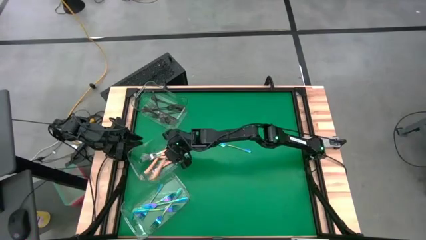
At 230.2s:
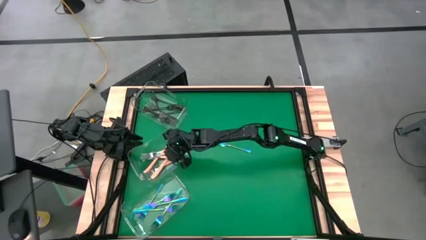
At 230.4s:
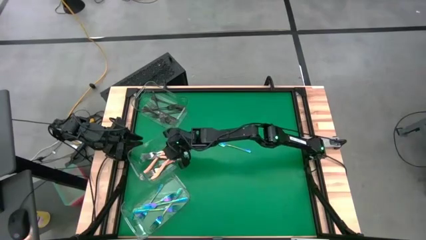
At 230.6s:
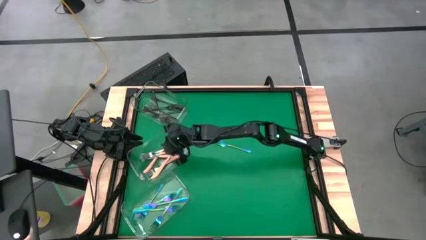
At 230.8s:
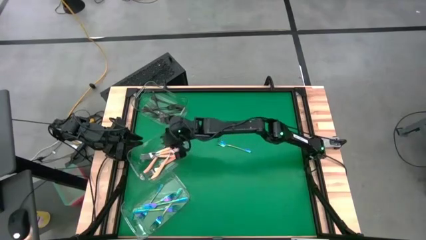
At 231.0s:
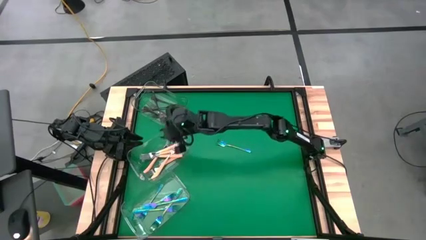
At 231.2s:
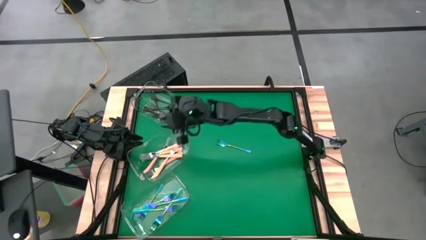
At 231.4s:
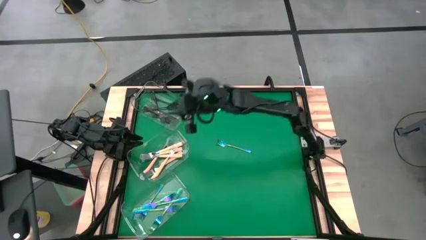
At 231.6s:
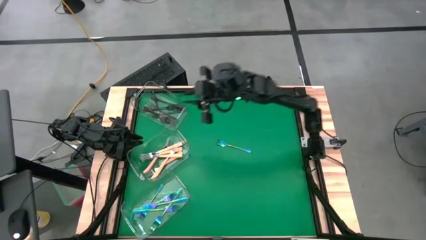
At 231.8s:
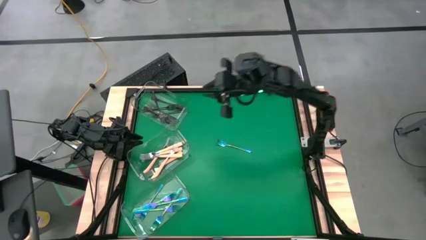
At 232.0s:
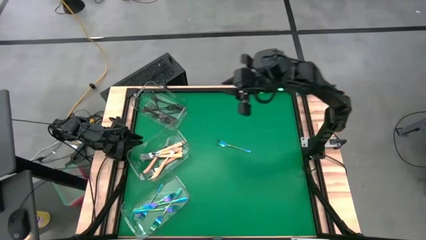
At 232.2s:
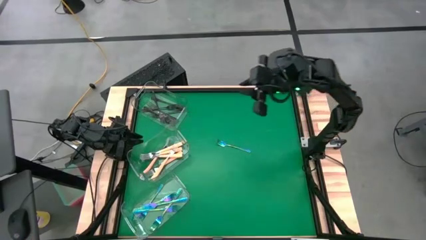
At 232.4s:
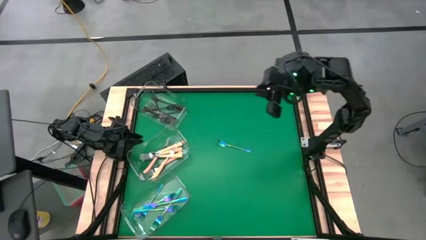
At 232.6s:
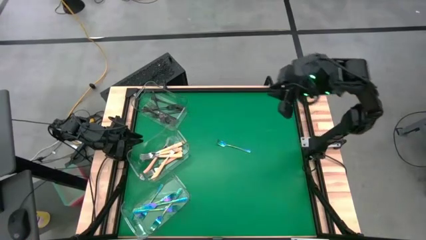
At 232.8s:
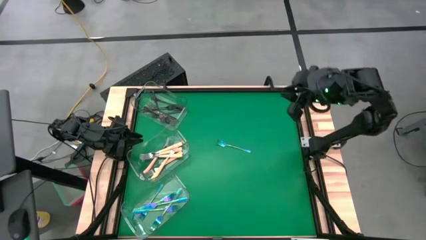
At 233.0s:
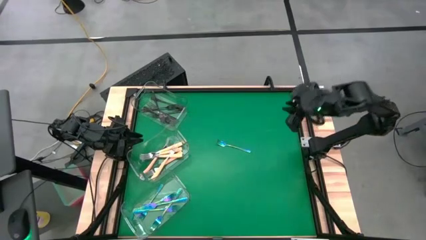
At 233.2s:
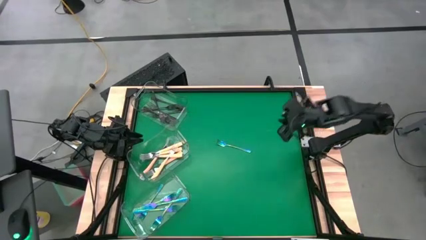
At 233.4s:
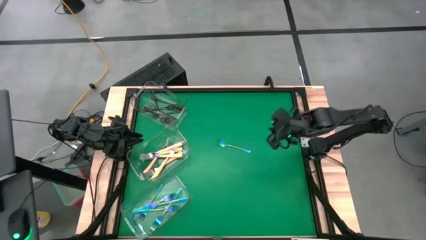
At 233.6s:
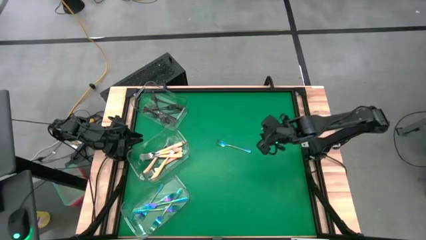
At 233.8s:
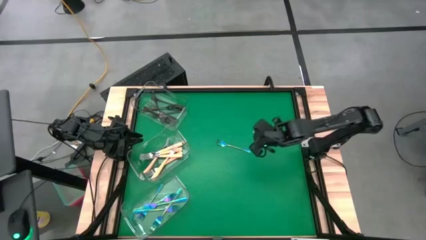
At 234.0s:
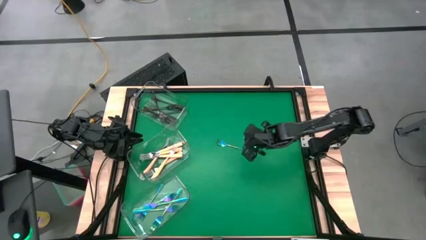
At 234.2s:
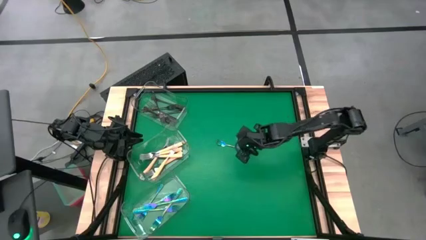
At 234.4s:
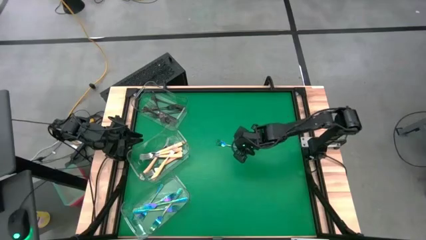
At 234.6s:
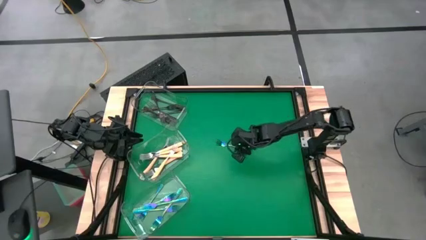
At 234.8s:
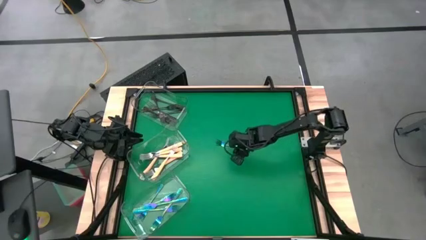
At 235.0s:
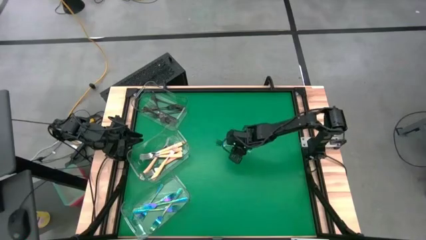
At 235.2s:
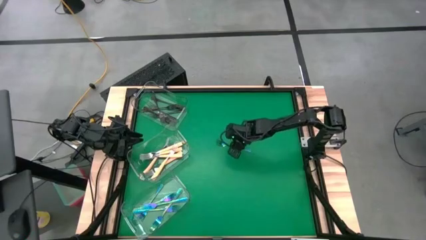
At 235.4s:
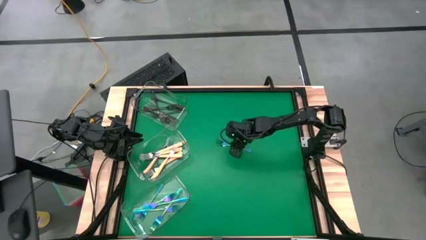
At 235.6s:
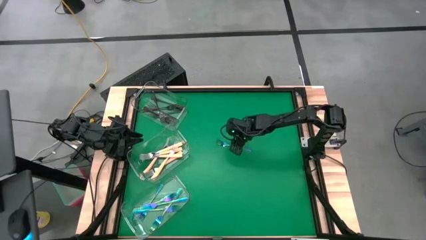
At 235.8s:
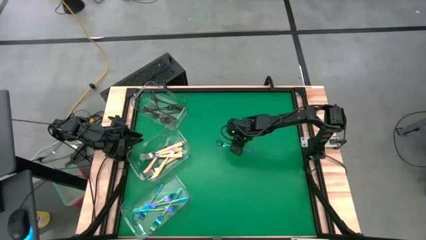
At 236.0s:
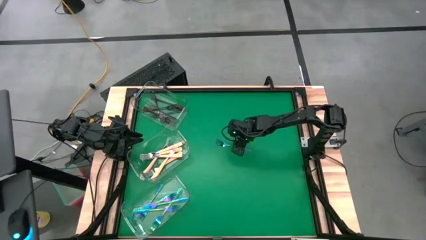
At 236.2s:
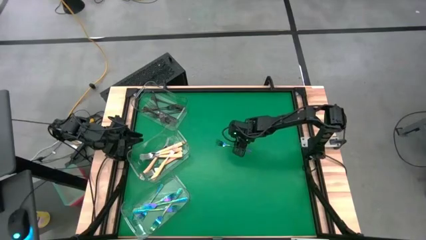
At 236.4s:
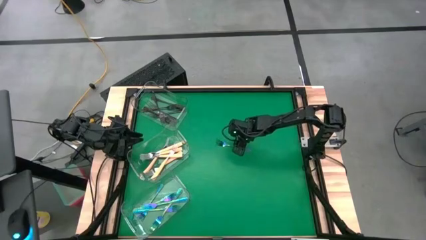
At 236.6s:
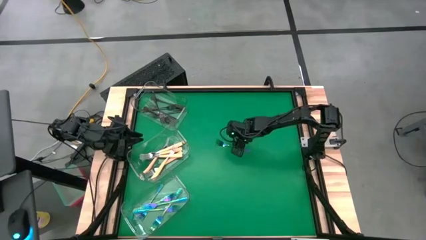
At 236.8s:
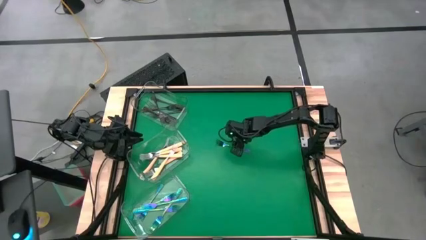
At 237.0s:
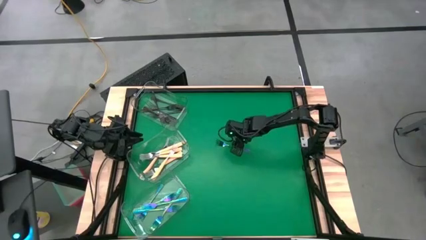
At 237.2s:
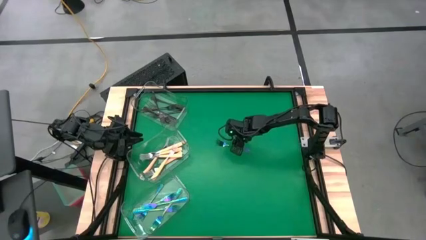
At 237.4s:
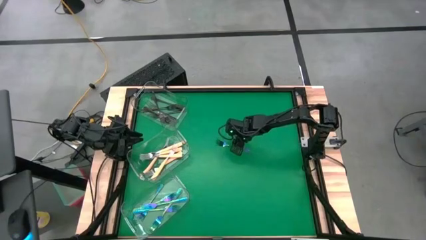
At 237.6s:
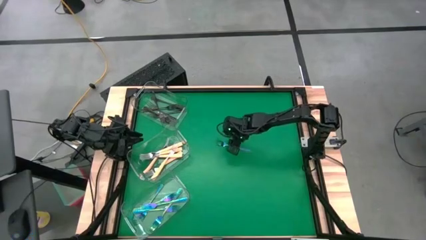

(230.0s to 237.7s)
Task: Sort silverware by color (type)
Put the blue fork into the bottom transparent bin

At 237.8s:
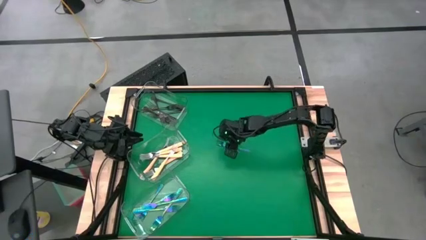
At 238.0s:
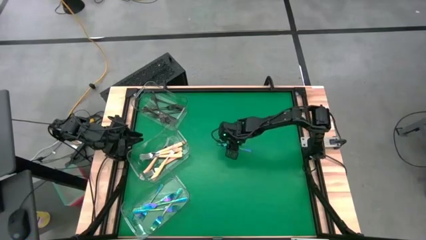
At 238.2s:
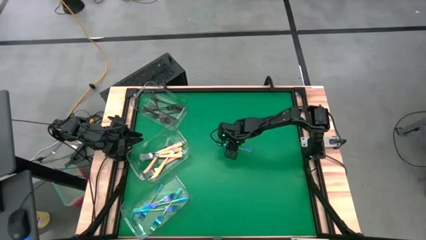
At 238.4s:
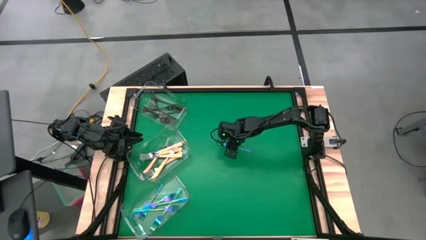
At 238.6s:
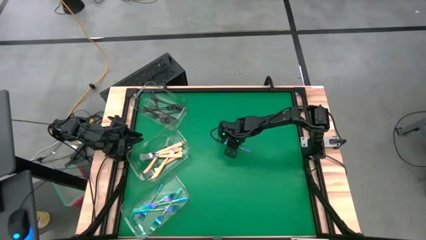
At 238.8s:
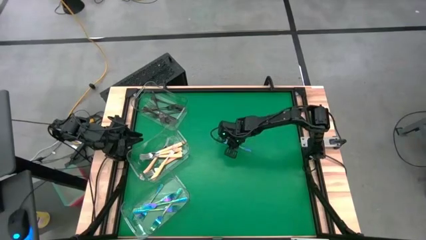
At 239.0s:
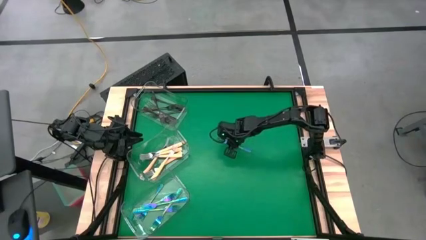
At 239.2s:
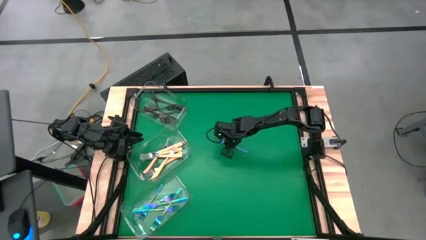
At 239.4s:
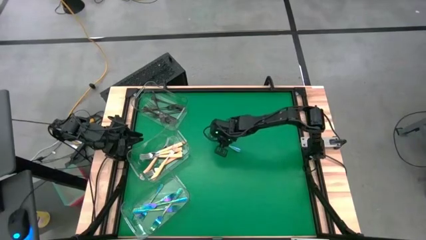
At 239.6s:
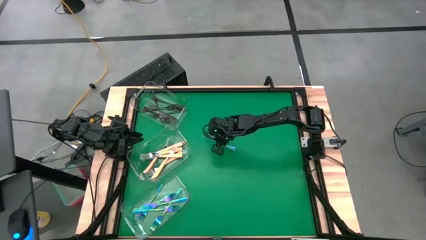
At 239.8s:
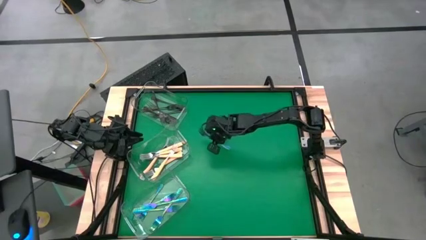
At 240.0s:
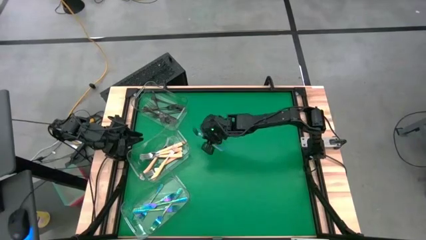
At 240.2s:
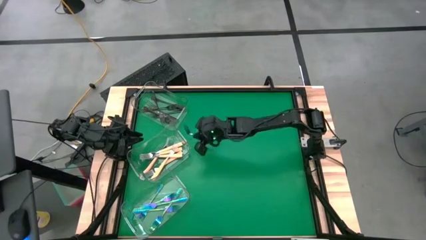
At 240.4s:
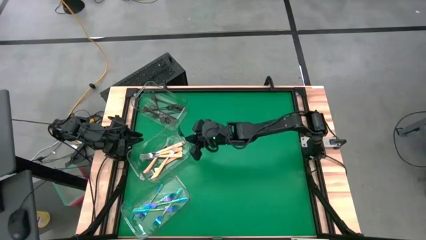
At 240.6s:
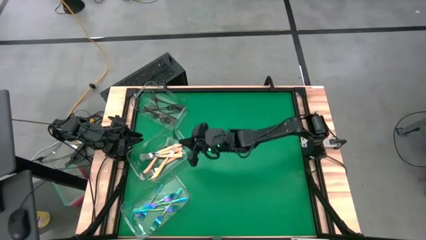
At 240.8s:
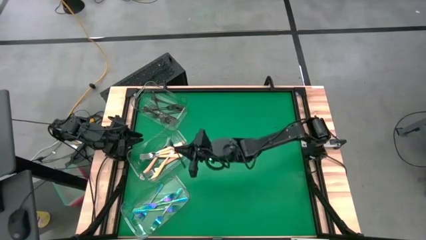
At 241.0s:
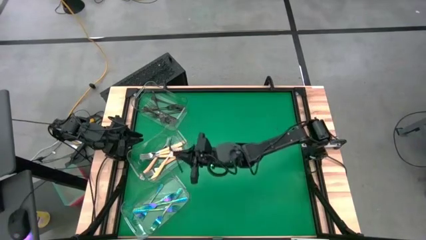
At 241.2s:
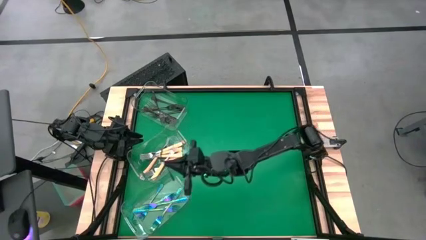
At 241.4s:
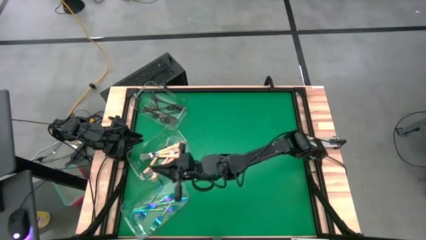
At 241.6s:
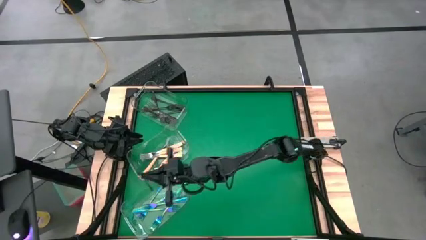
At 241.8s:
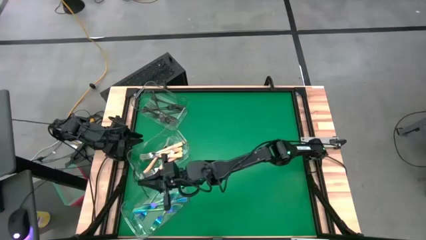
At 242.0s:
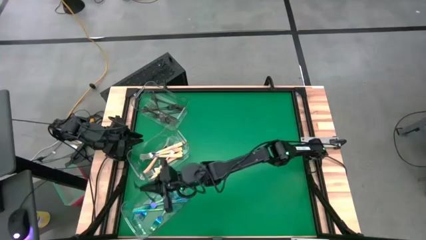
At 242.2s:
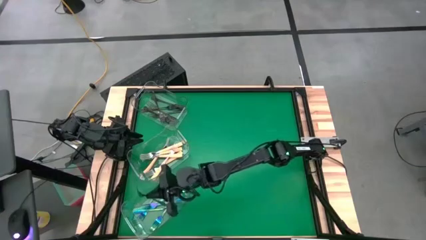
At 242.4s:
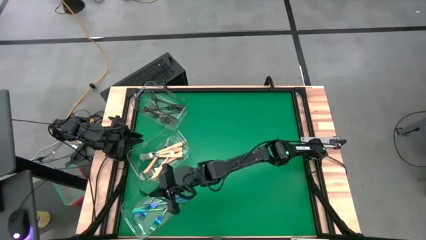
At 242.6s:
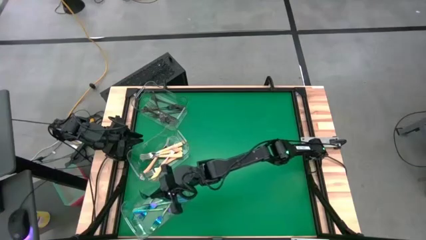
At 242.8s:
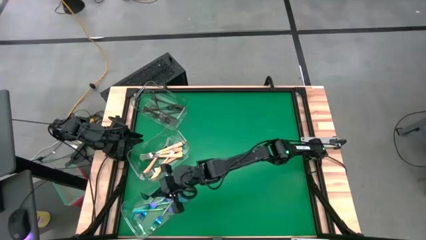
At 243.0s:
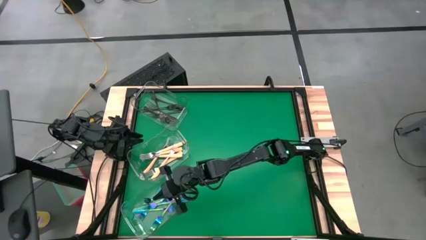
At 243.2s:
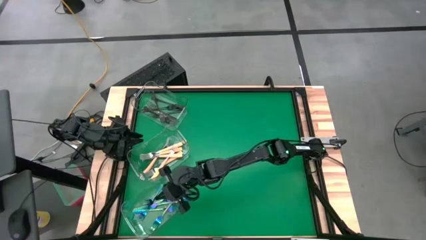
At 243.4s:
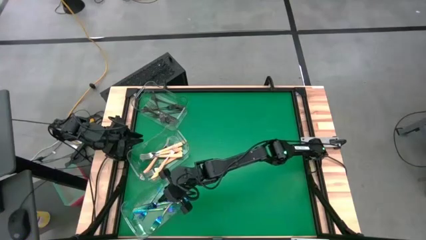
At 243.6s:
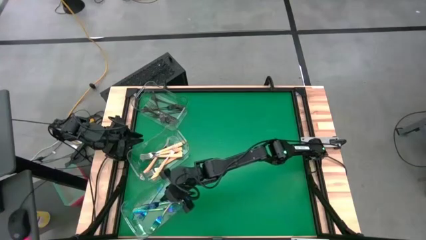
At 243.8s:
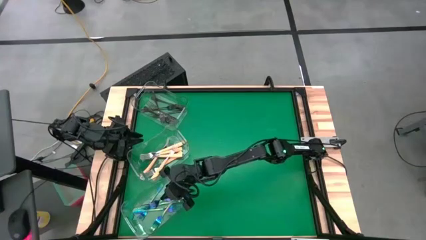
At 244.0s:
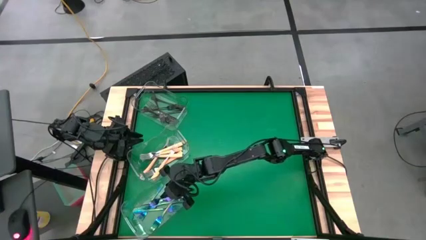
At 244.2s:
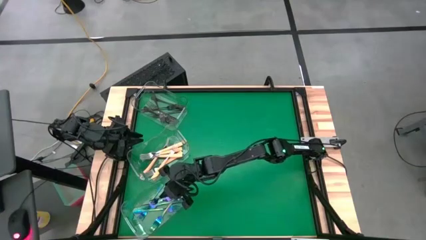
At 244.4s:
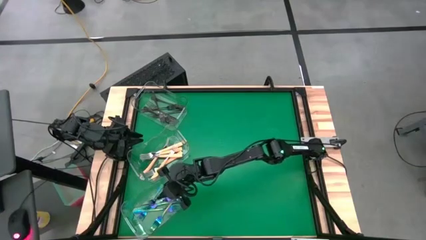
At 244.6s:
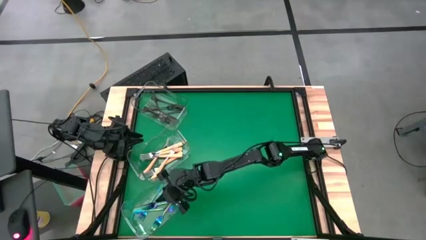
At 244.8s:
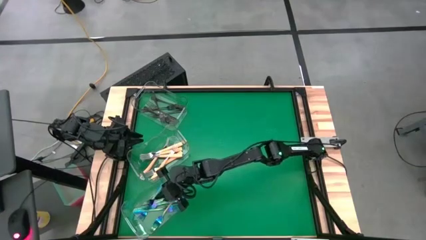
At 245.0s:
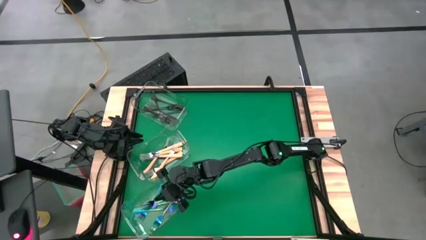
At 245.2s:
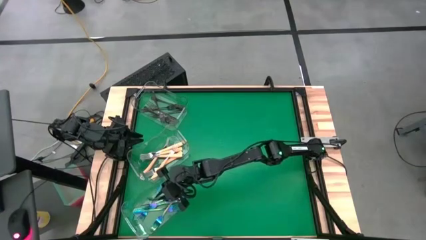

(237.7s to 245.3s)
Put the blue fork into the bottom transparent bin

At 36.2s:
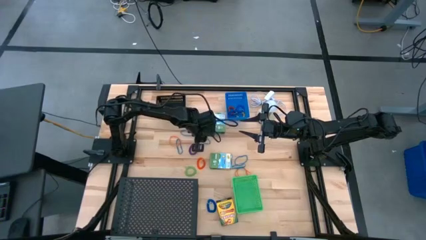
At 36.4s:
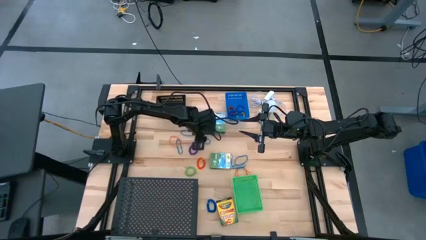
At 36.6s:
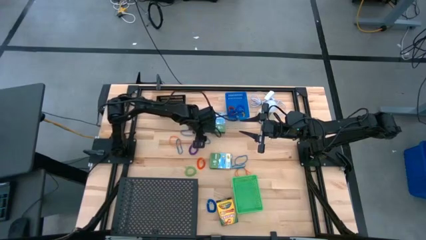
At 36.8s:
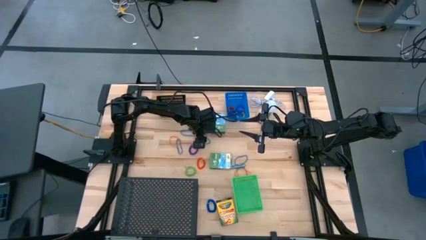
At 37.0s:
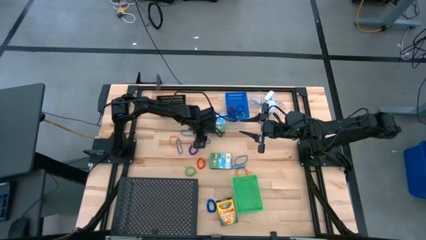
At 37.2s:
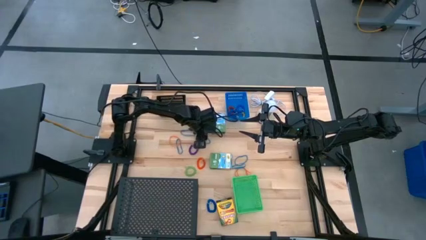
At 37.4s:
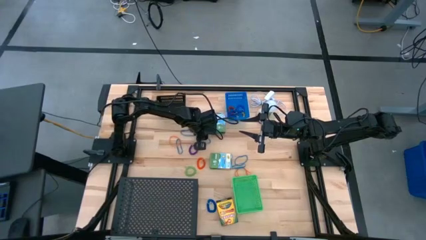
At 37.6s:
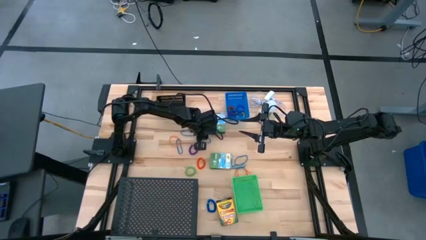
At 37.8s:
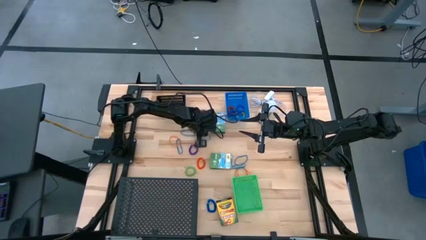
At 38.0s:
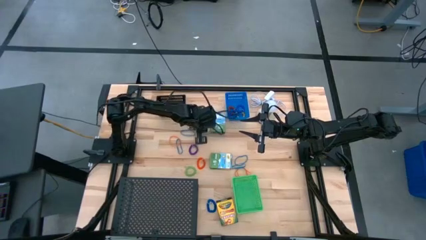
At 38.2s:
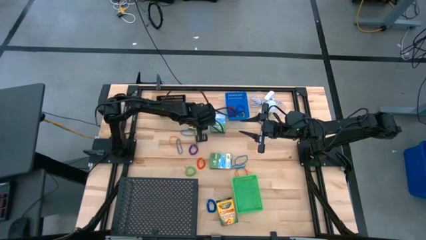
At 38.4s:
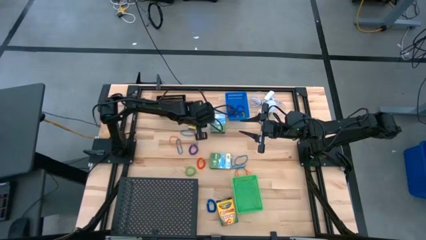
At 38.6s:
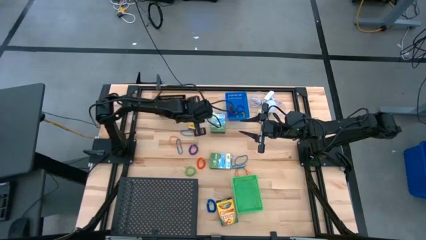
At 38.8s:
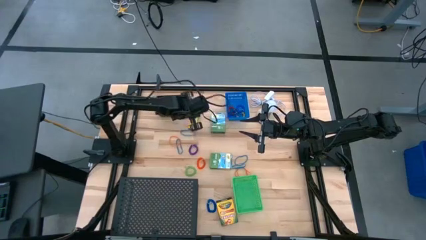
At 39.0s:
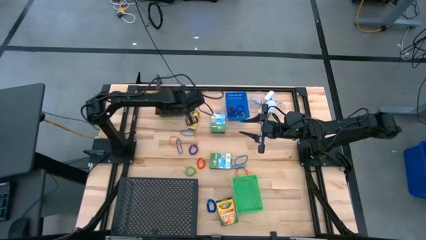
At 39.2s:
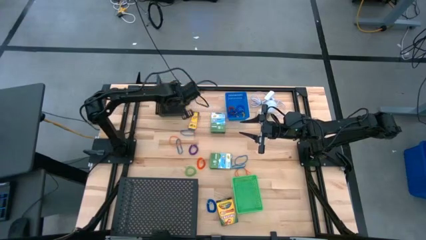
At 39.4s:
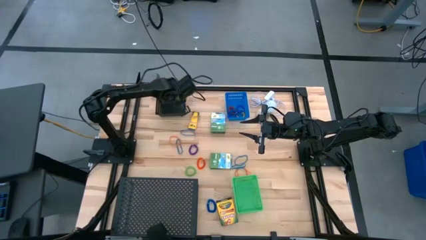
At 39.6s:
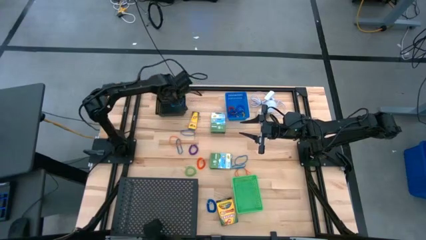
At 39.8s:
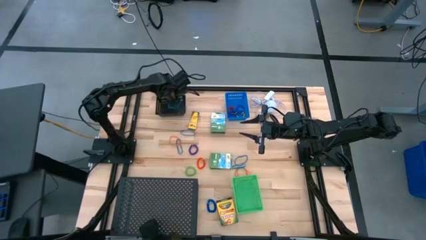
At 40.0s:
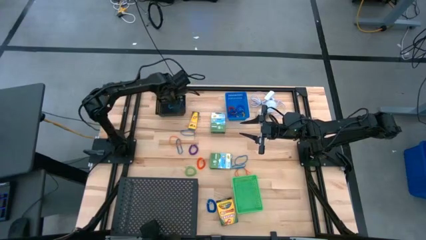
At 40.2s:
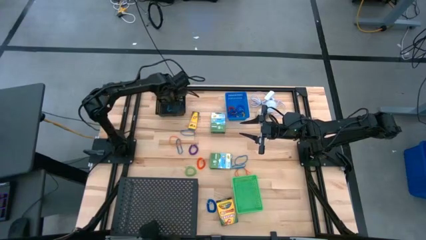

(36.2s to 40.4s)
Task: Pick & Place Office Desk Supplies
Put the blue rubber band into the black bin
